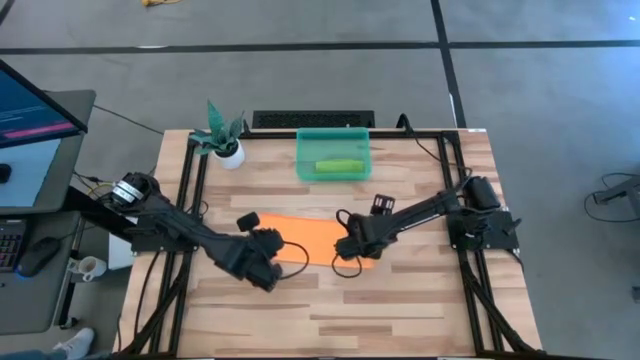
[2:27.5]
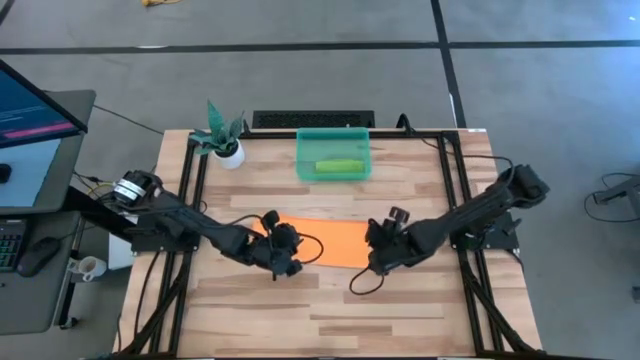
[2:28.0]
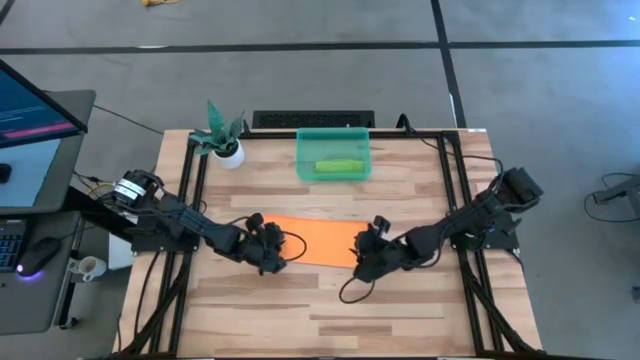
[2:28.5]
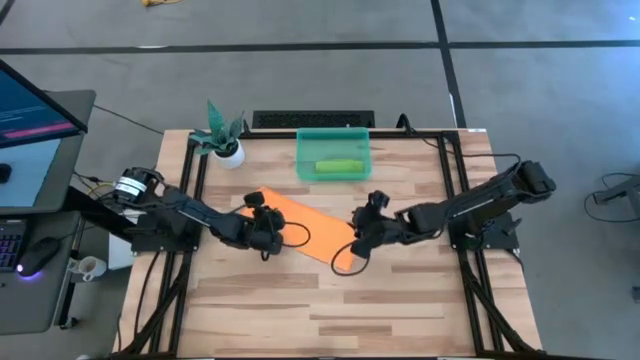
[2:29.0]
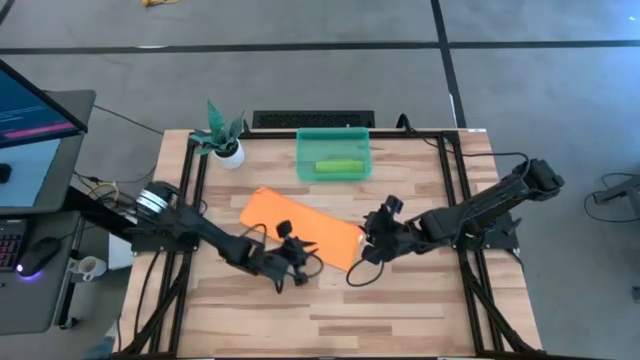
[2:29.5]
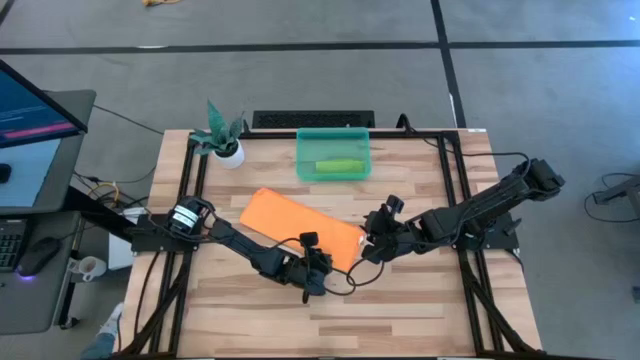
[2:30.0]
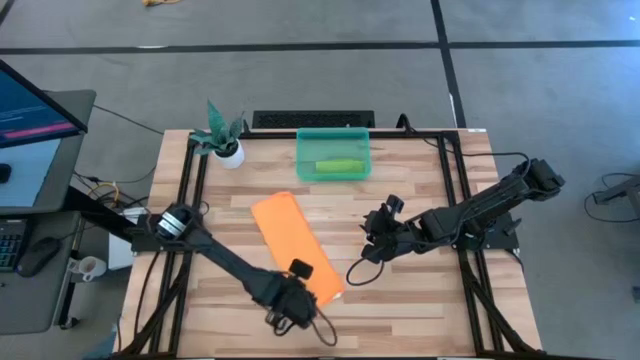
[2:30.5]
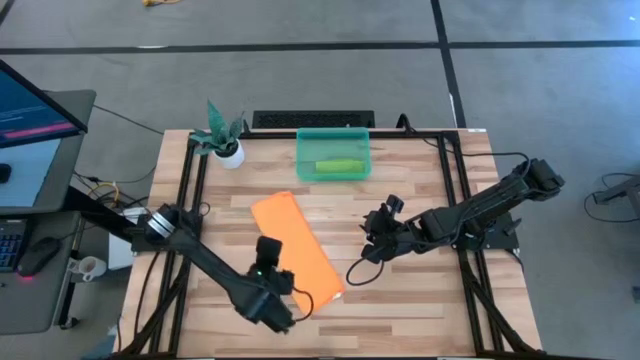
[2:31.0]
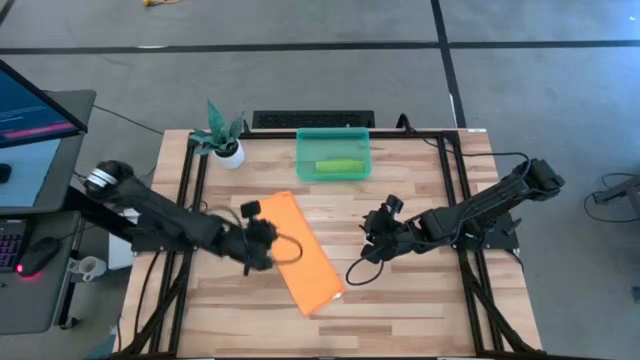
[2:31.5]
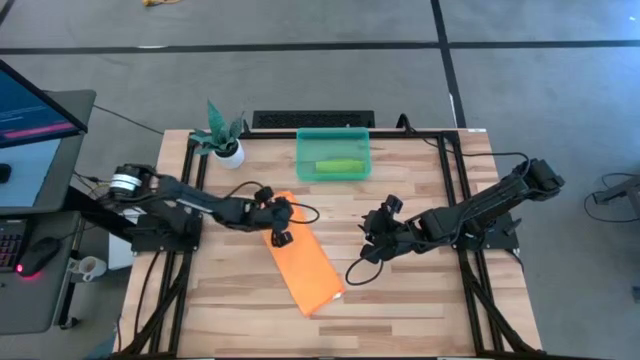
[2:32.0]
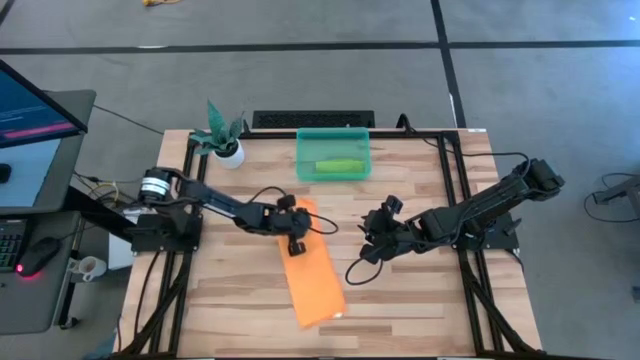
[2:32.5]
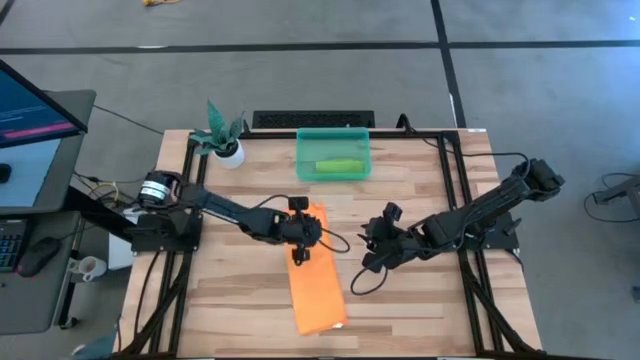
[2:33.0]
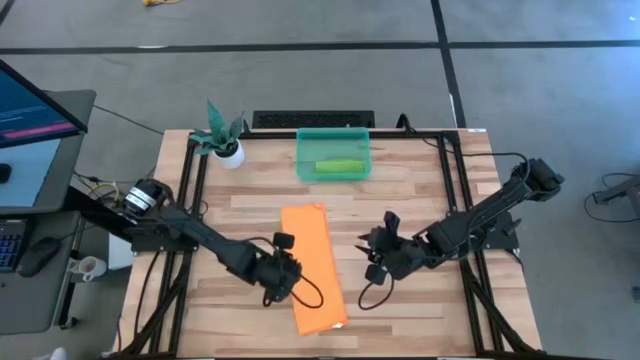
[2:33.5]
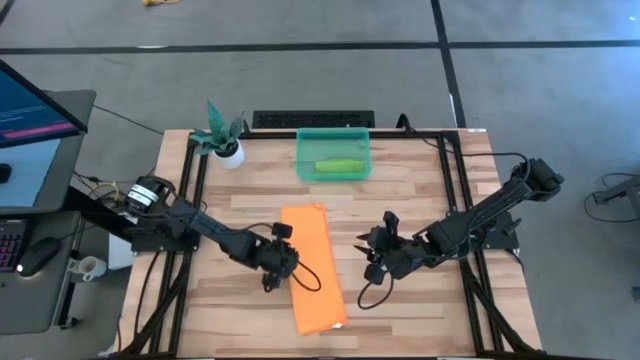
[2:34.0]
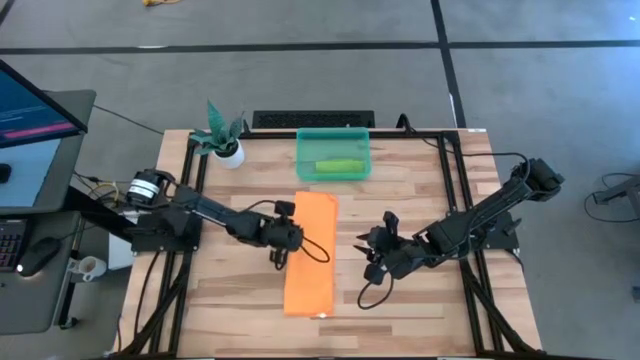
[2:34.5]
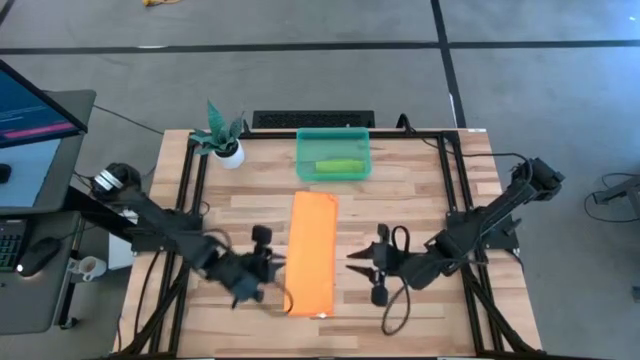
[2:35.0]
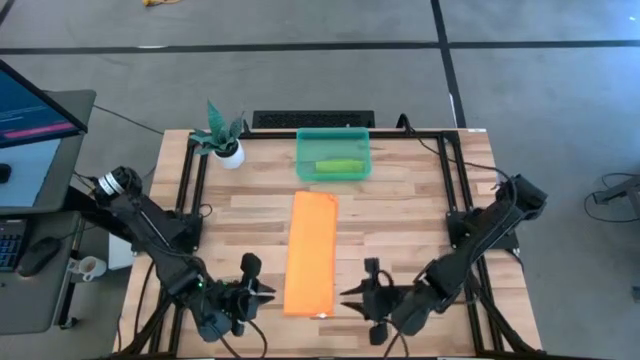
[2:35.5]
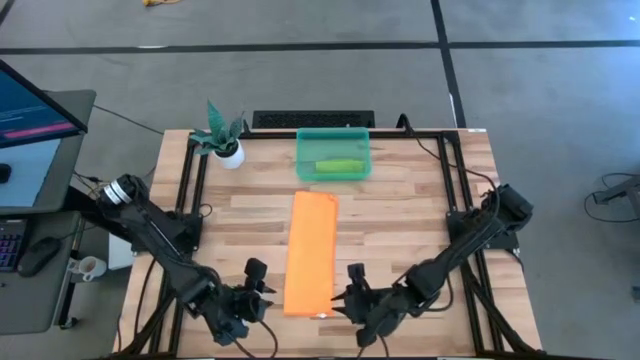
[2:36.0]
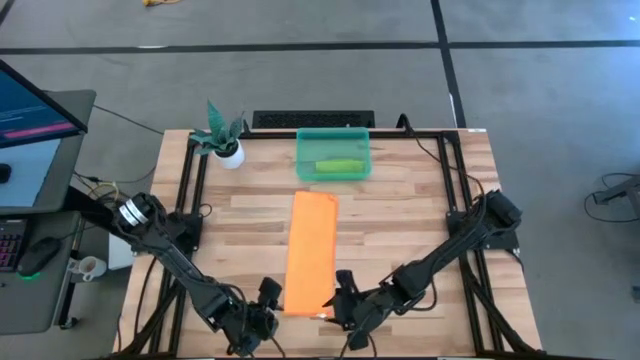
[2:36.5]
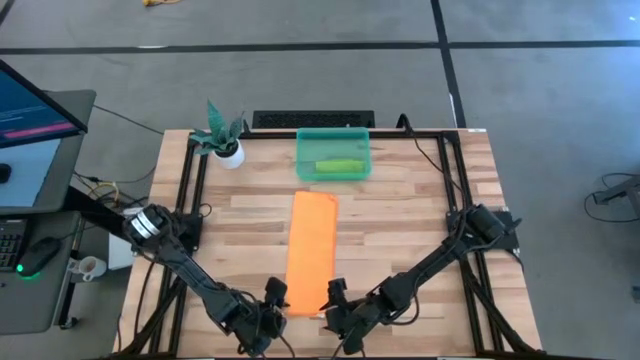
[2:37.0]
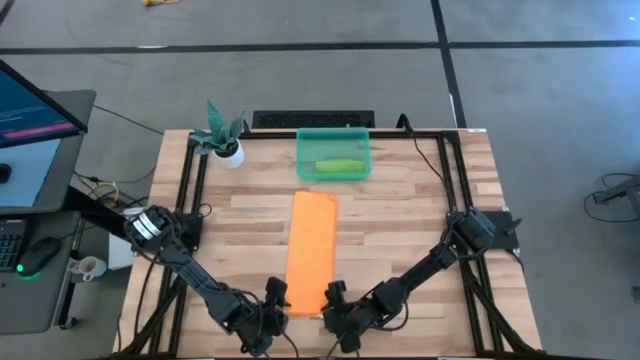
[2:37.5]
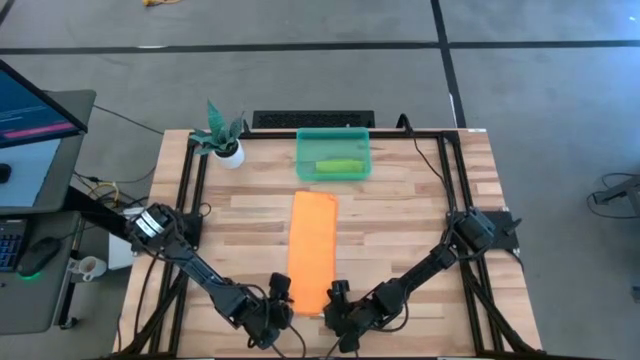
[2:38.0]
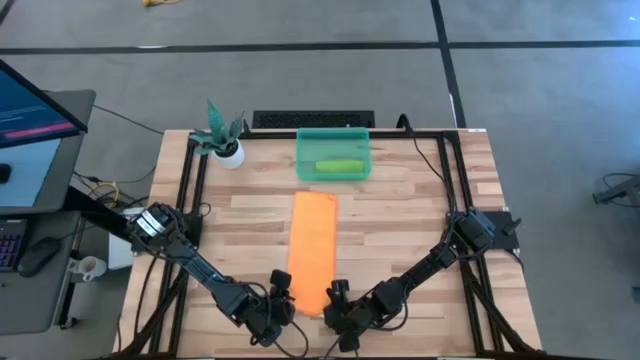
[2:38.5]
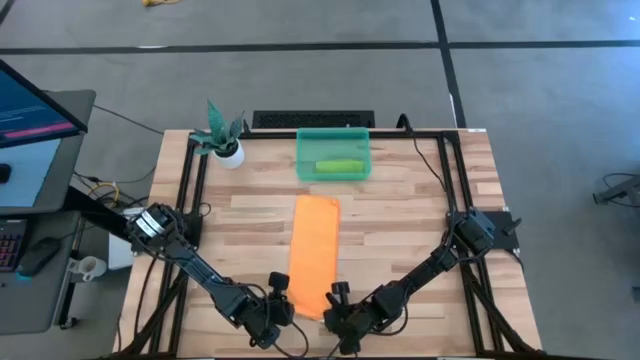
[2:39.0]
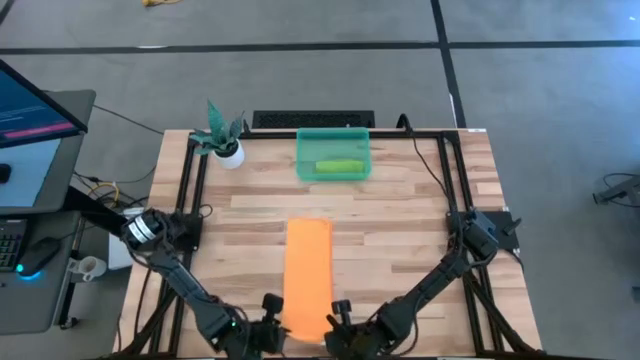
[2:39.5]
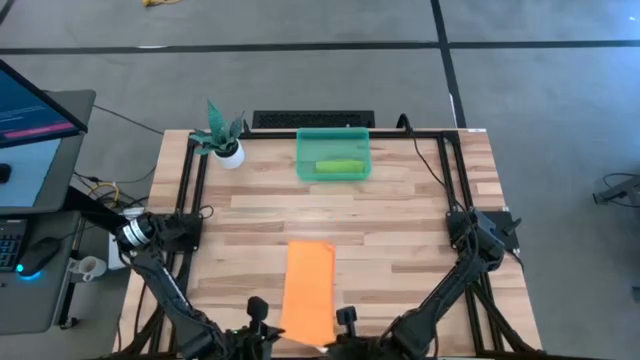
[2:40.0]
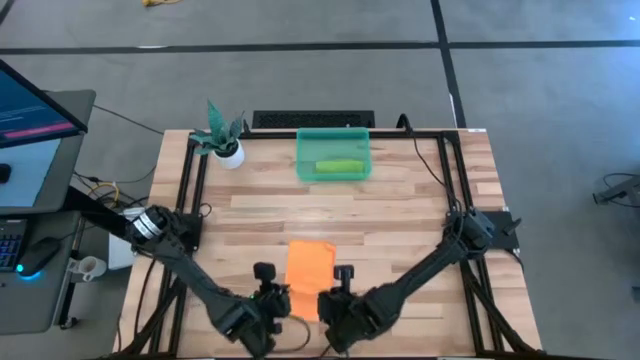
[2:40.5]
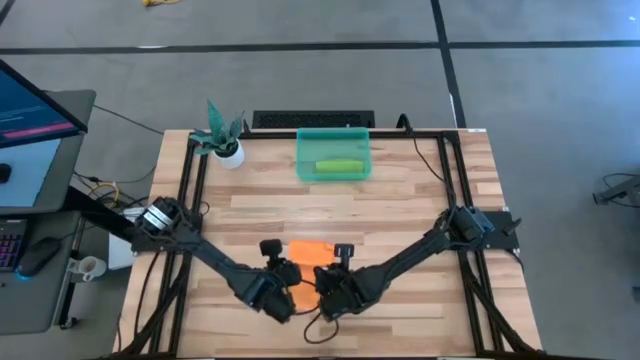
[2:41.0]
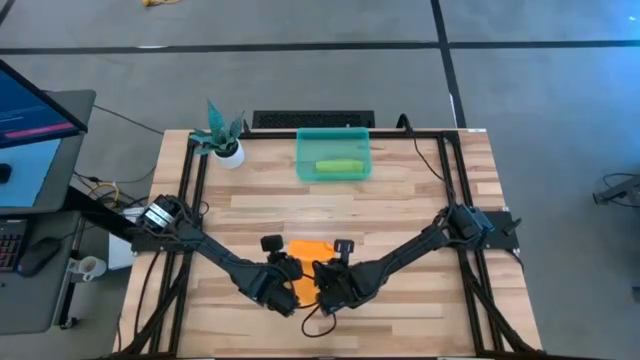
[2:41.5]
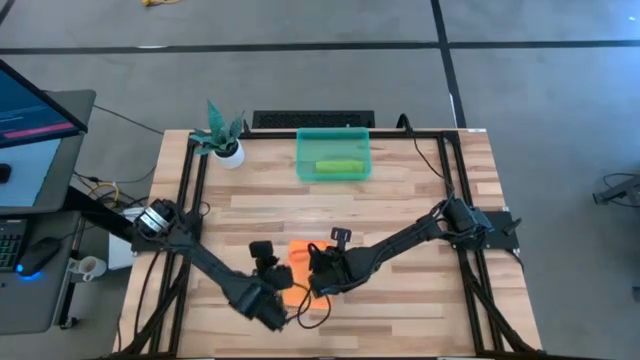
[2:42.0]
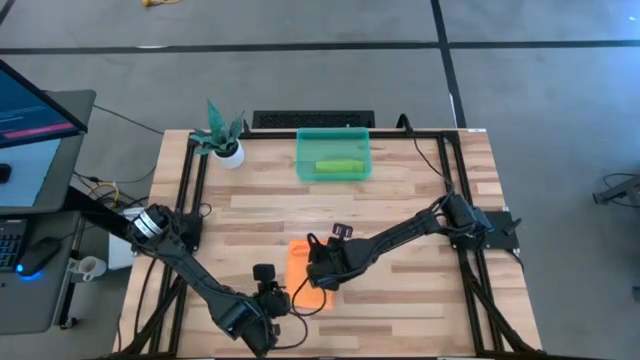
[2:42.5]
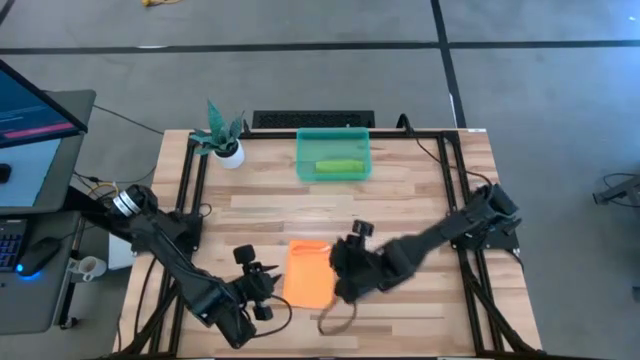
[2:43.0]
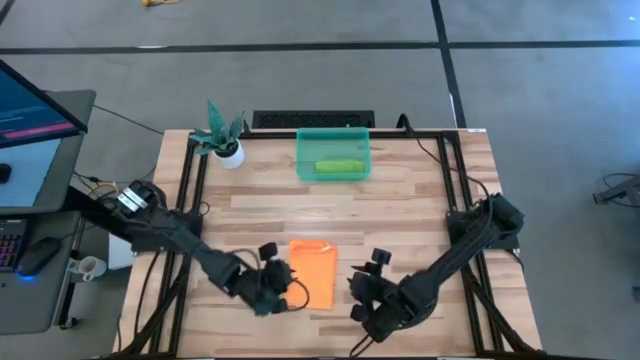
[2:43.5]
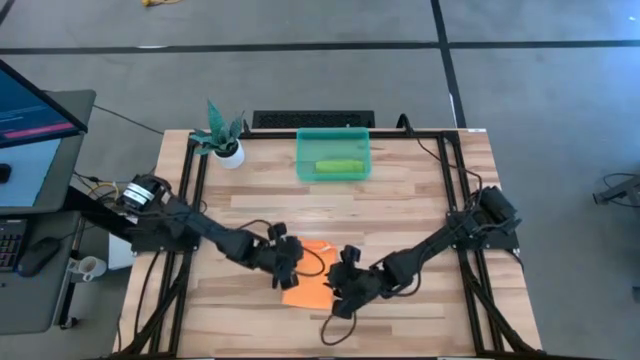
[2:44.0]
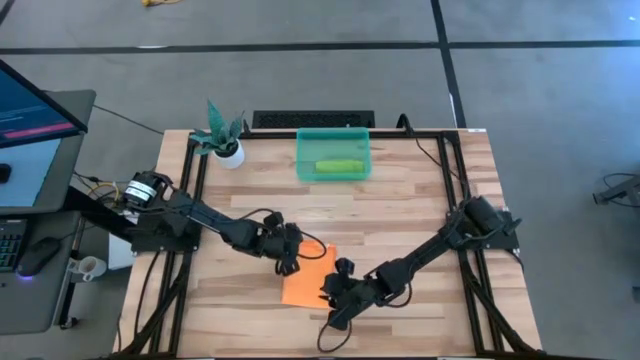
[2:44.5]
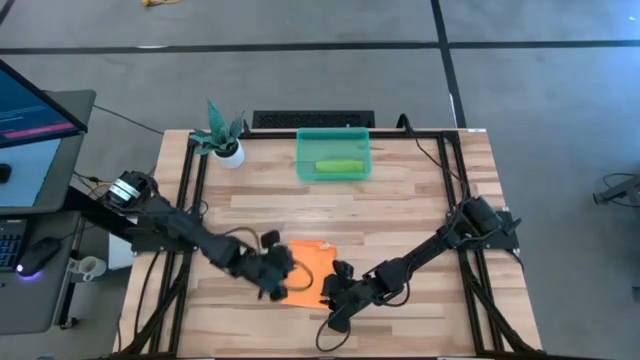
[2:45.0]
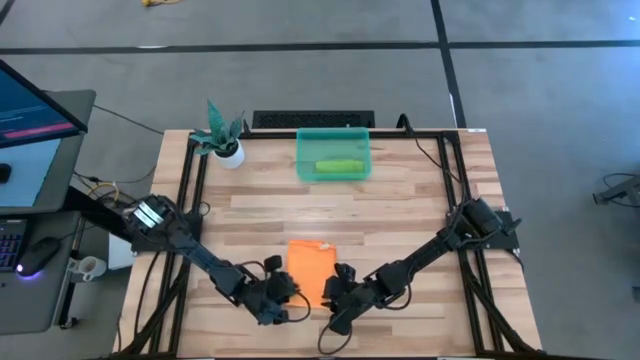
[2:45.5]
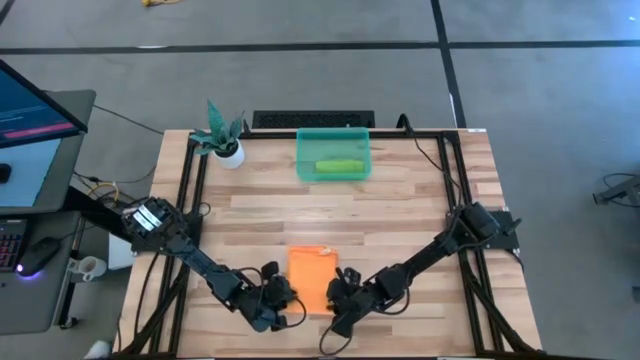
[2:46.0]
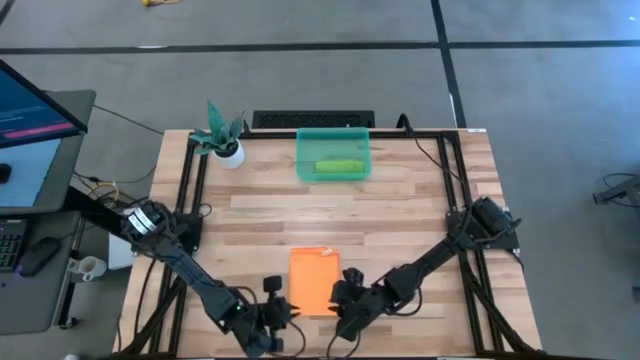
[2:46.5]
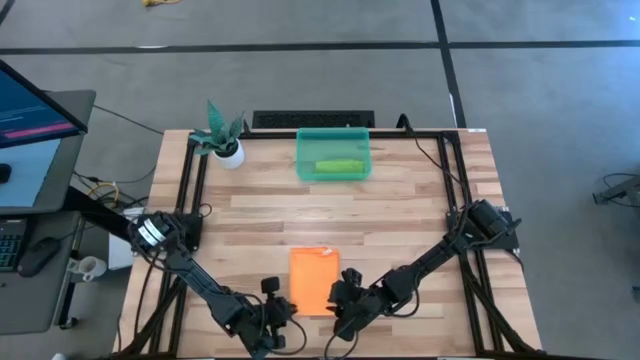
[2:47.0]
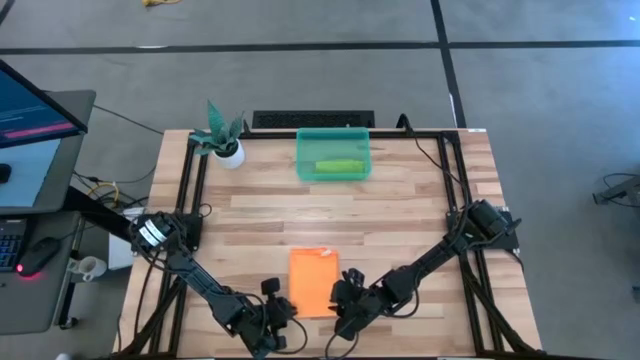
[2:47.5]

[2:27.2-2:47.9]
Task: Roll towel into tight, uniform cylinder
Roll the orange microfiber towel

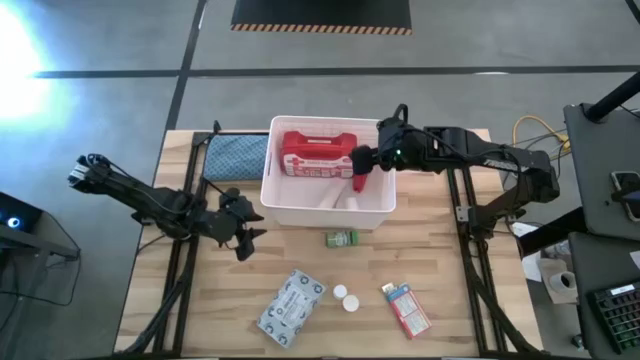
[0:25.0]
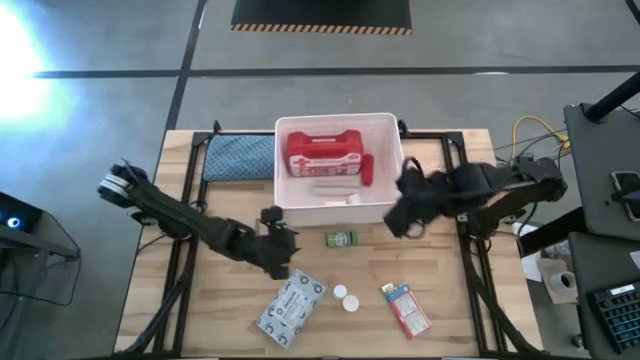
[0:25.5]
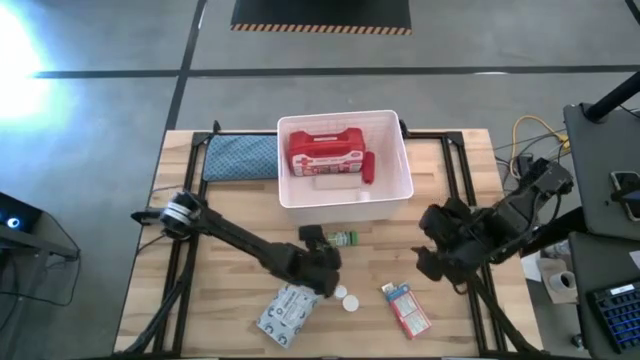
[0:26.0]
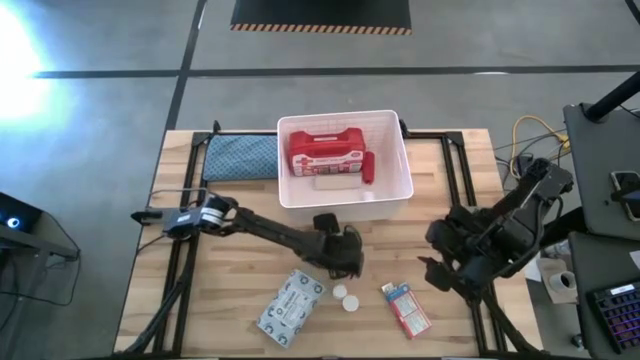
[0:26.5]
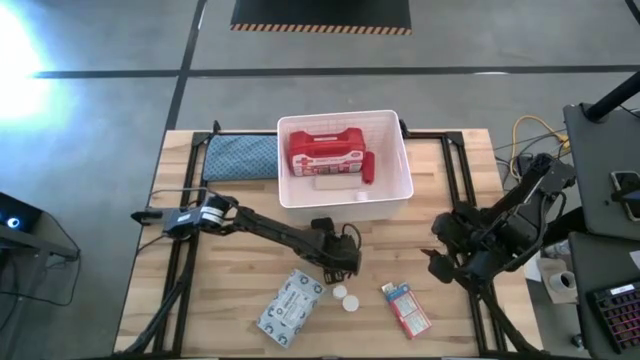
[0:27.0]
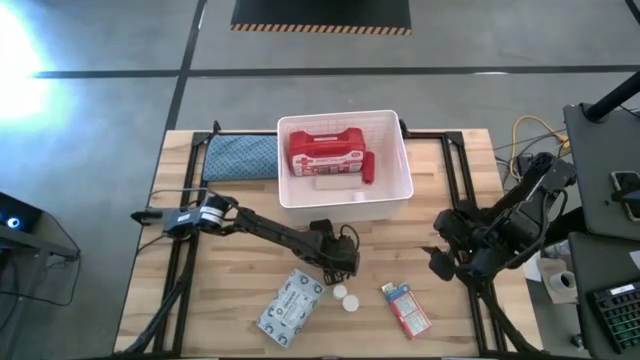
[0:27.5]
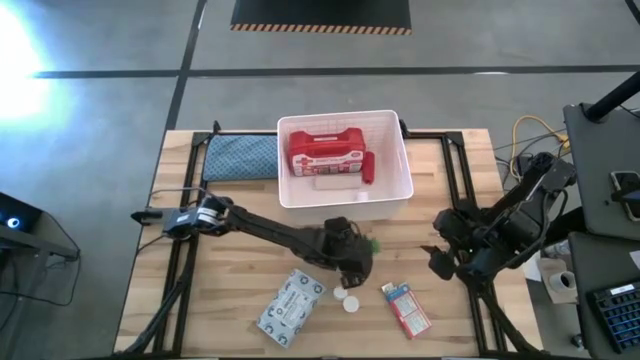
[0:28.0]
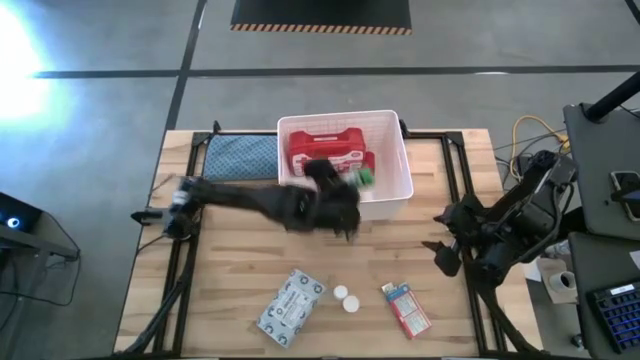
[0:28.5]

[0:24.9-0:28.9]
Task: Pick & place medical supplies in basket/bin
Put the green medicine bottle into the bin
